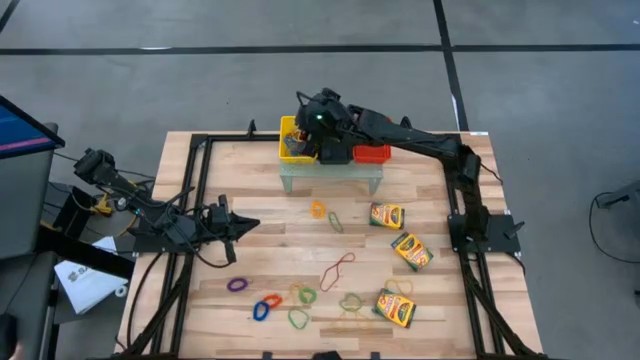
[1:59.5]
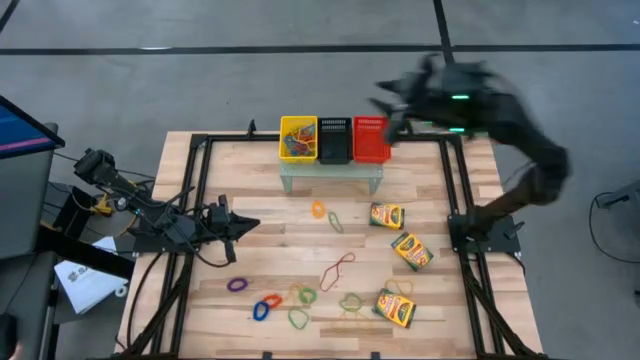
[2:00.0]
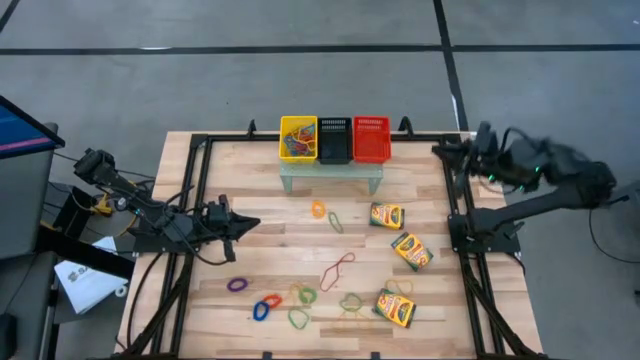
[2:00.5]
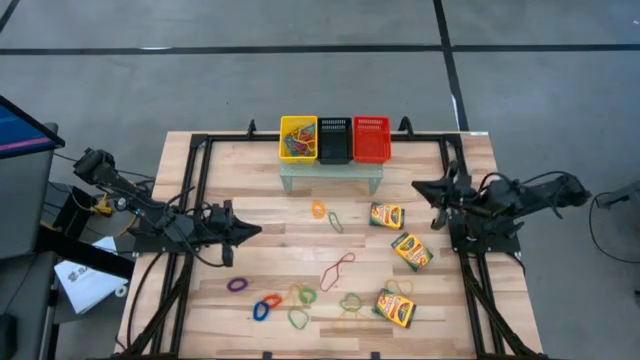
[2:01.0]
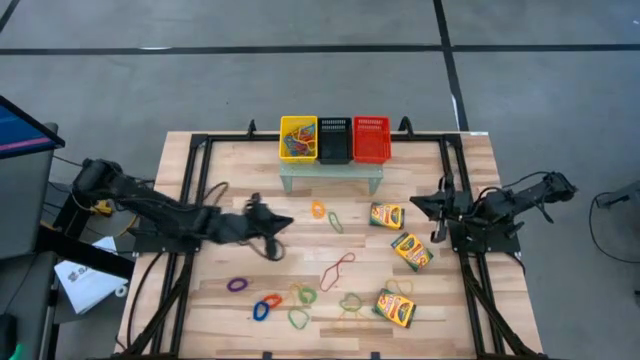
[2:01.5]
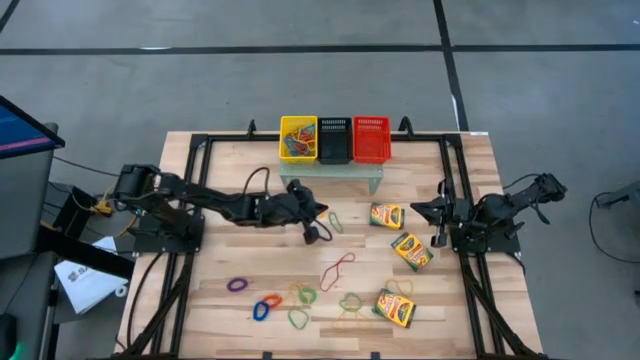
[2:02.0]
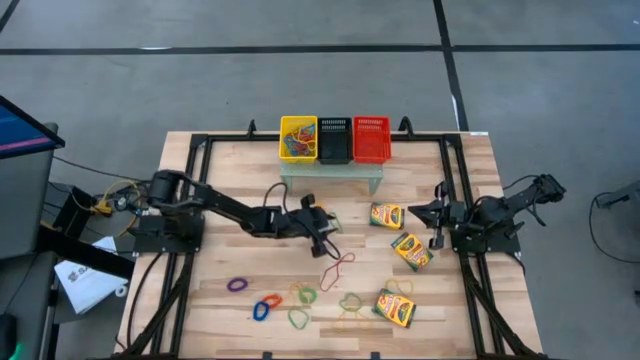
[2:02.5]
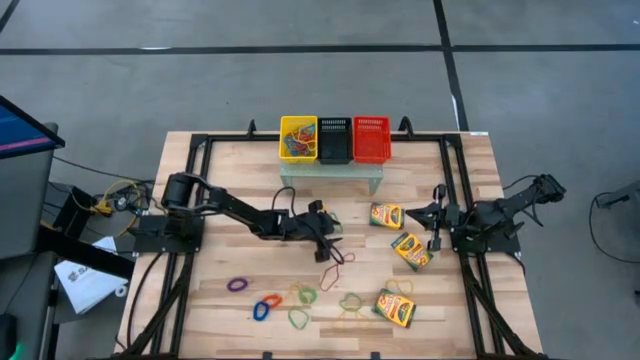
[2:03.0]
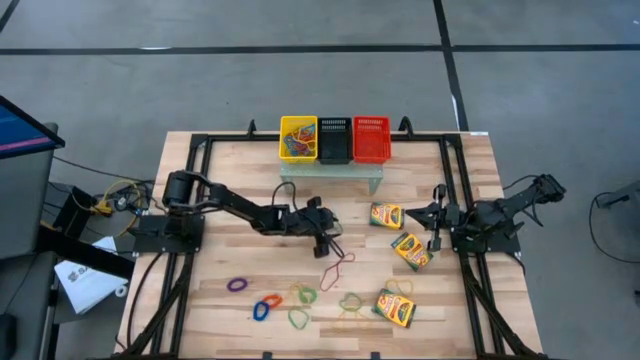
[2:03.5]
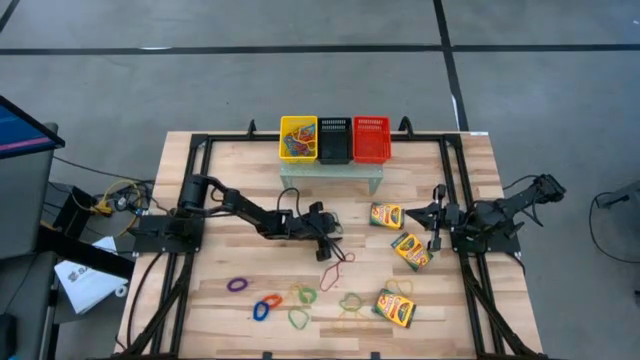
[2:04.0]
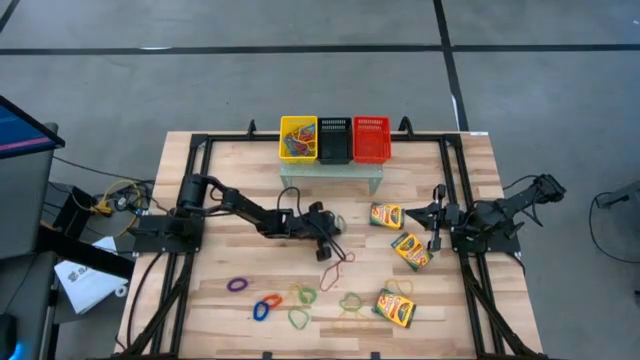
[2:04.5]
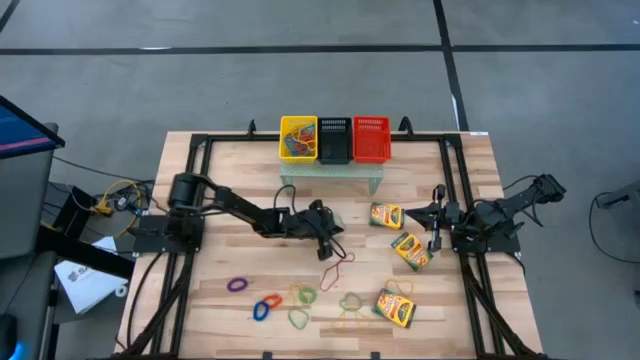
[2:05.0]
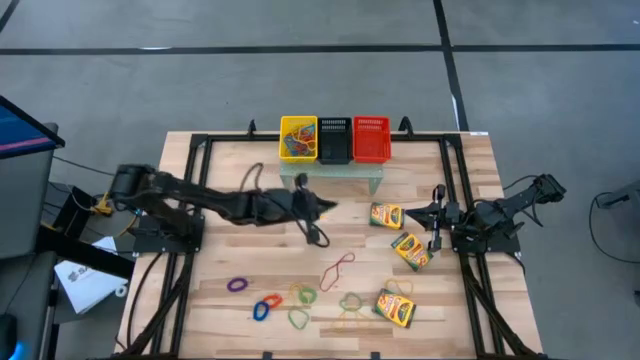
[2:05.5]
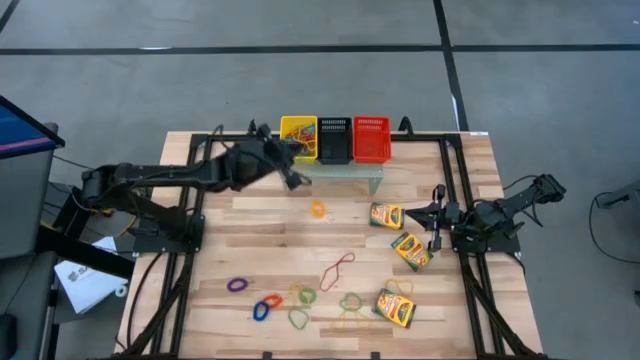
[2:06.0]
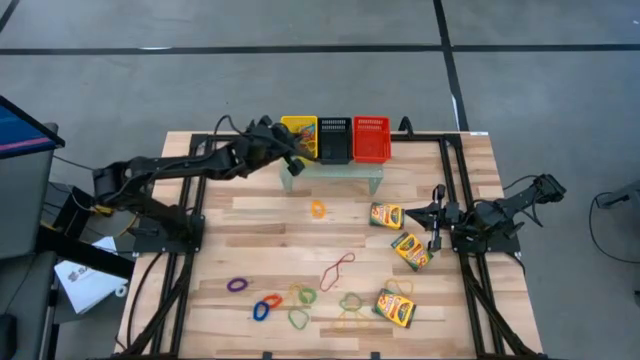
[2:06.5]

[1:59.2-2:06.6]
Task: Pick & Place Office Desk Supplies
Put the top small green rubber band into the yellow bin on the shelf

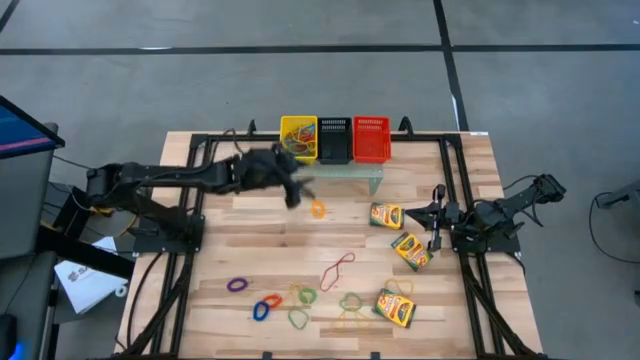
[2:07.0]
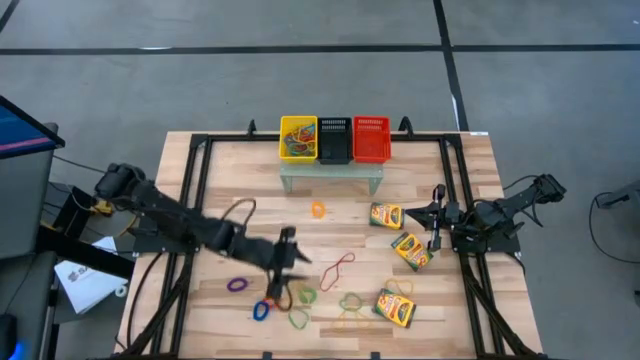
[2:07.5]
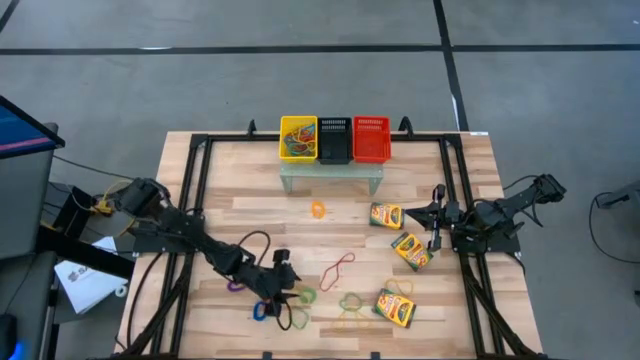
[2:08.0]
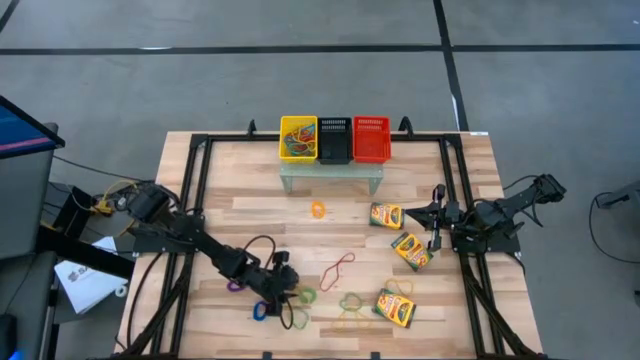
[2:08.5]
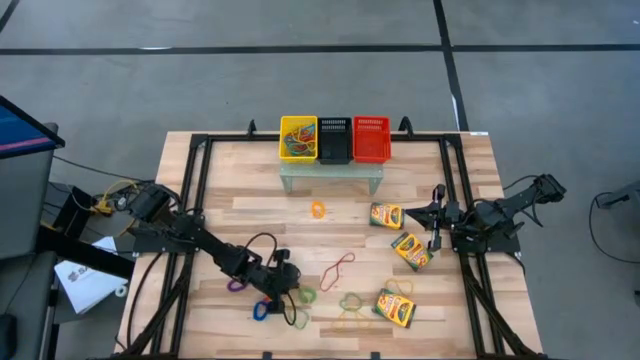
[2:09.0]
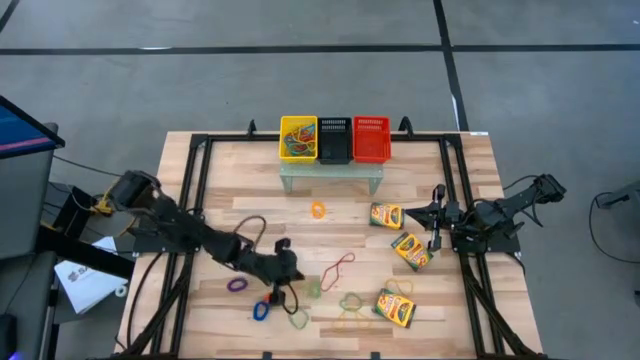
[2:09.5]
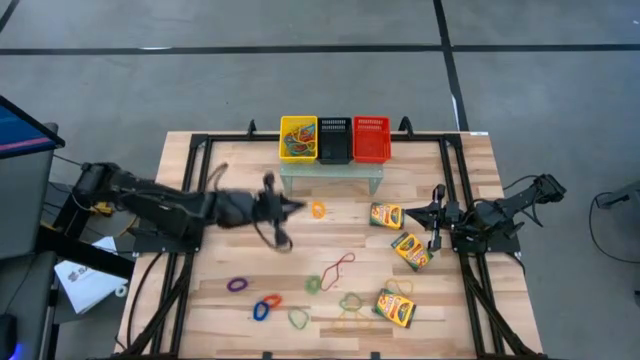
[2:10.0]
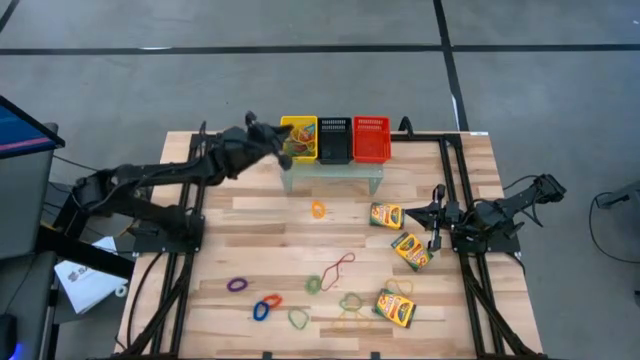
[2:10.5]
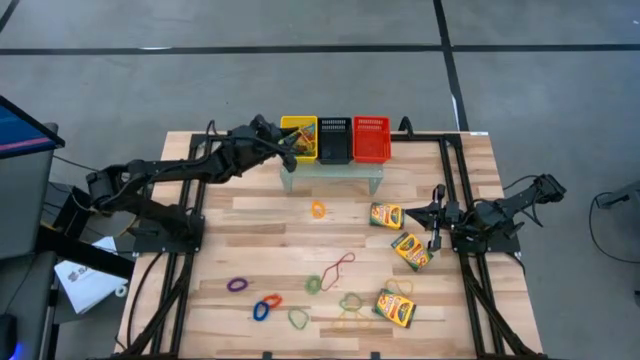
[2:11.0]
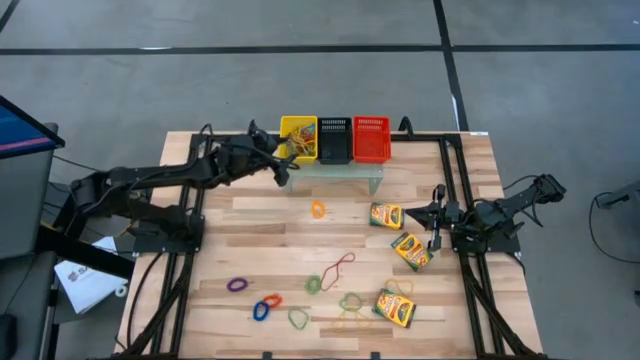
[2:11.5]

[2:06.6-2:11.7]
Put the top left big yellow rubber band into the yellow bin on the shelf

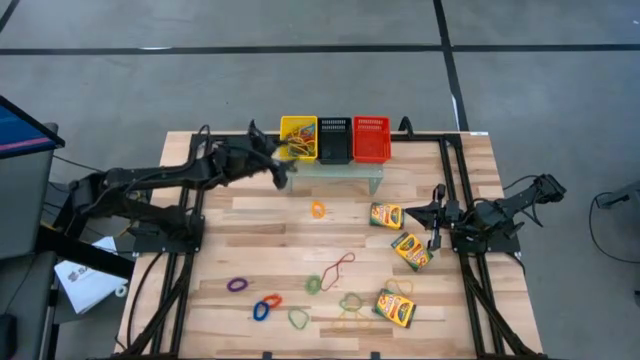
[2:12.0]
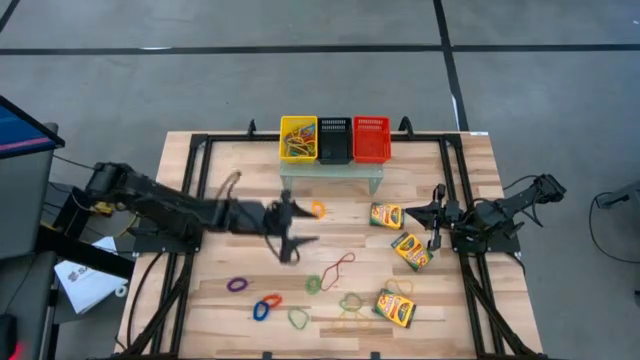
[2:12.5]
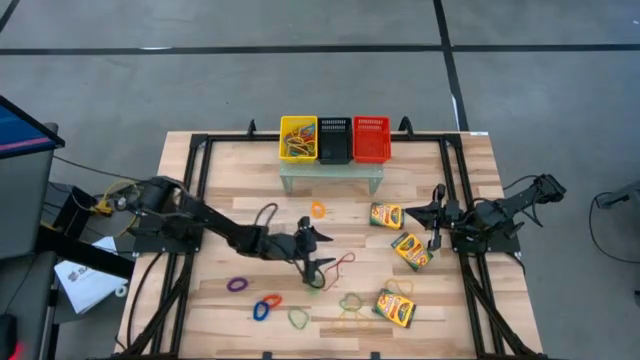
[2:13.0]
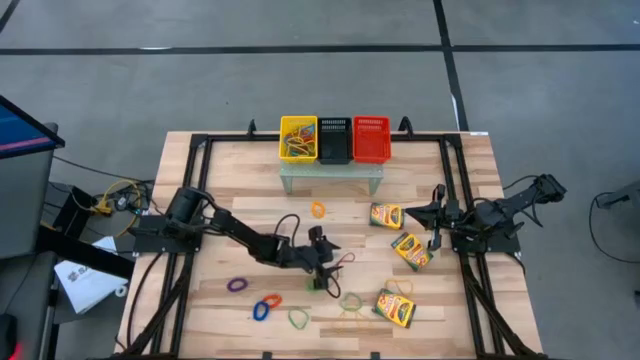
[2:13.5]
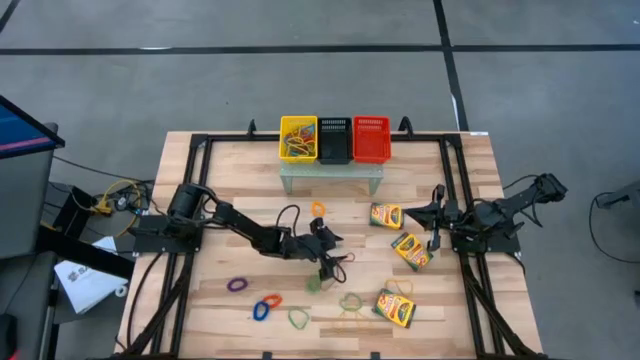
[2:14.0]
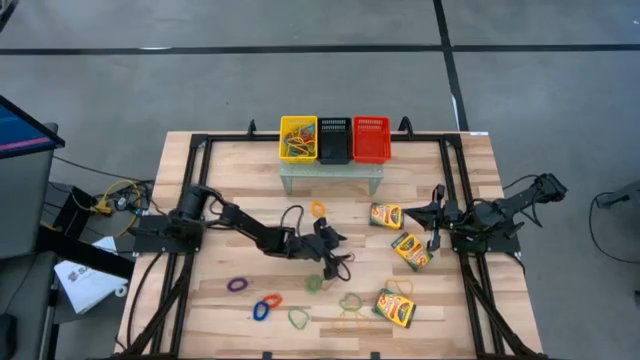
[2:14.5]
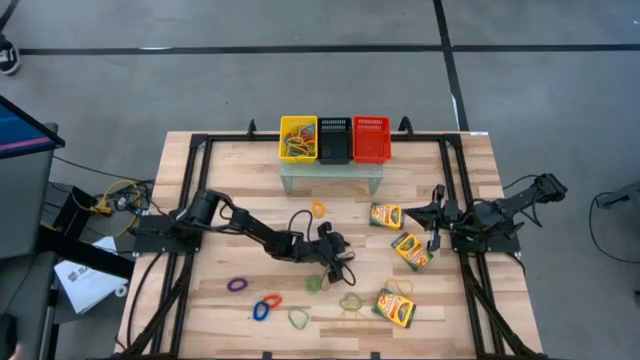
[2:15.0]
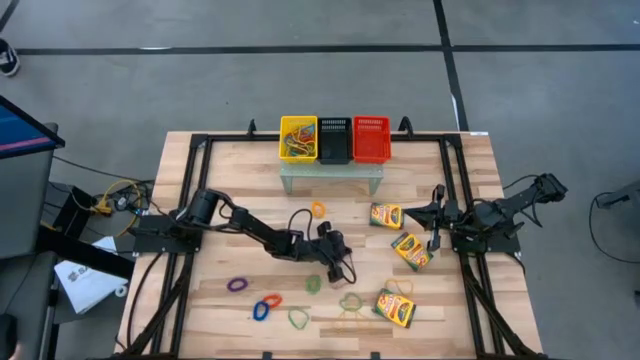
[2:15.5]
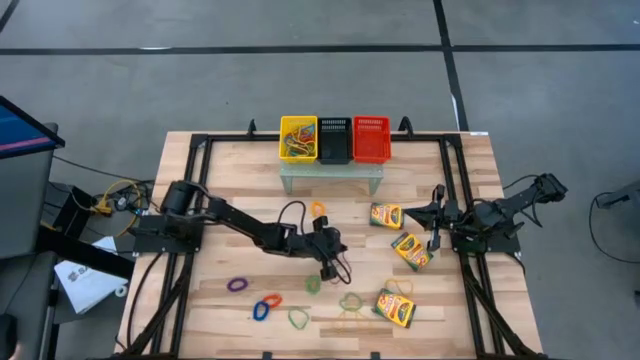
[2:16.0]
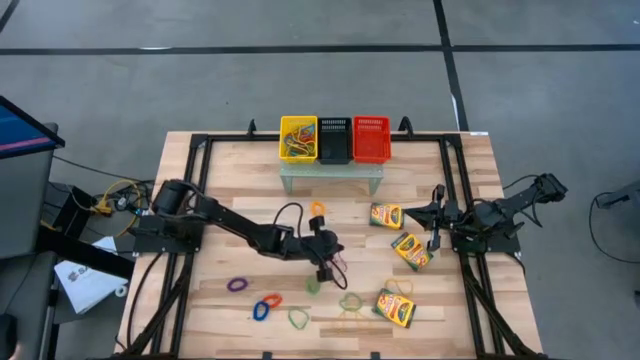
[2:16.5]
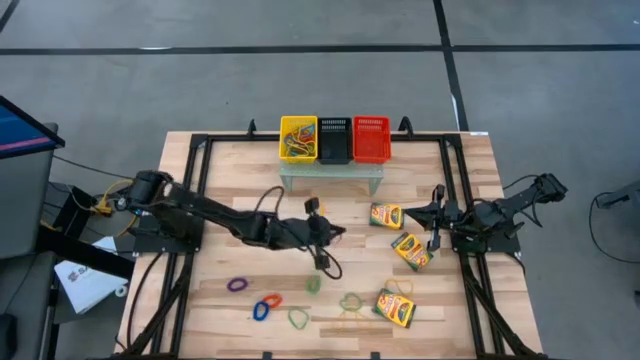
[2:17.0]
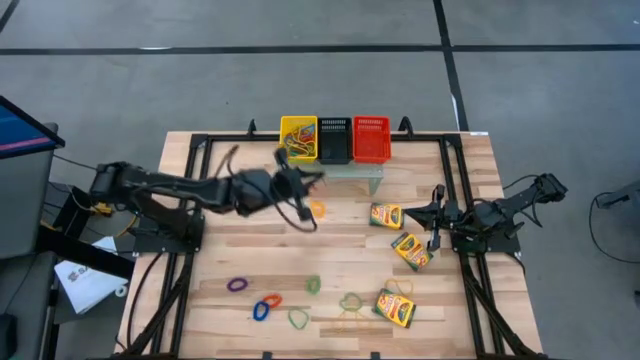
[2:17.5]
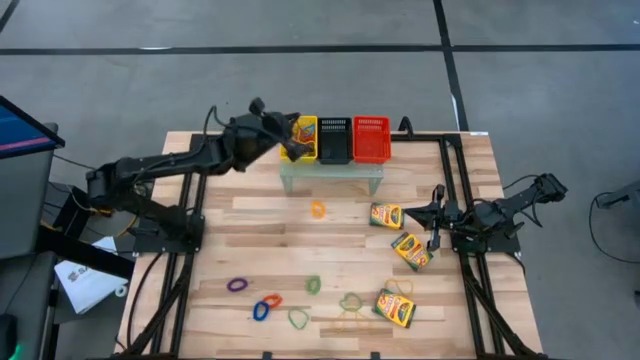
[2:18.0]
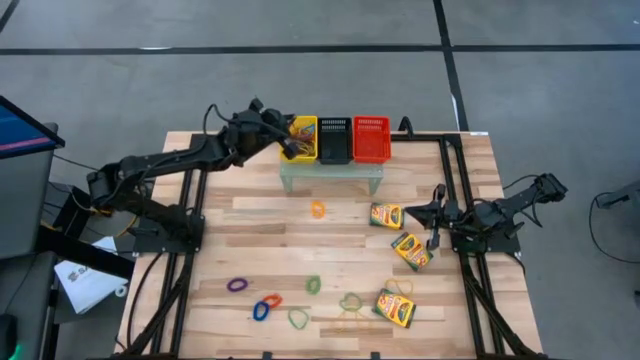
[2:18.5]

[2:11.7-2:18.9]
Put the big red rubber band into the yellow bin on the shelf

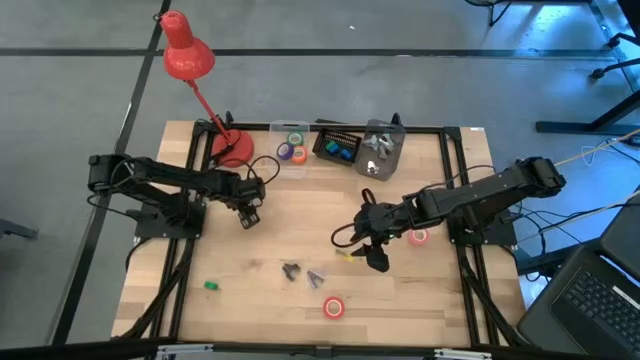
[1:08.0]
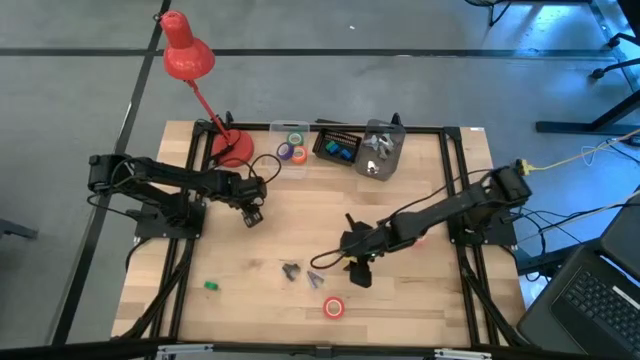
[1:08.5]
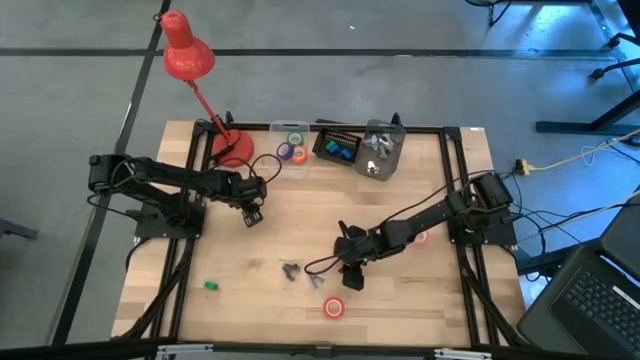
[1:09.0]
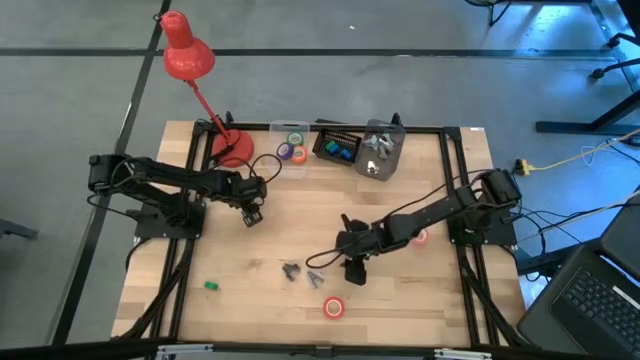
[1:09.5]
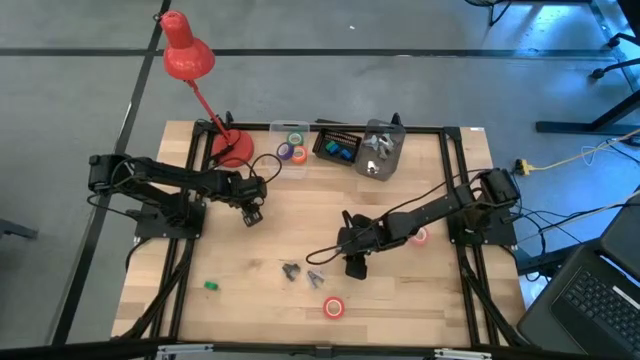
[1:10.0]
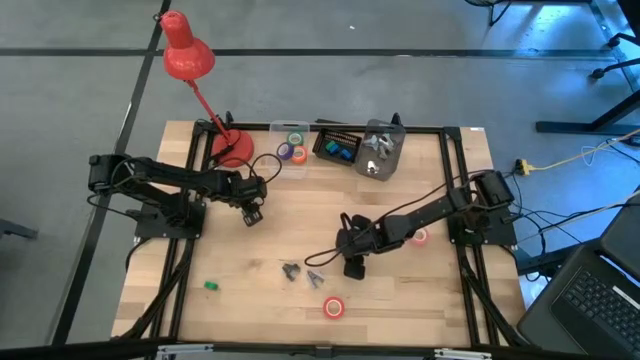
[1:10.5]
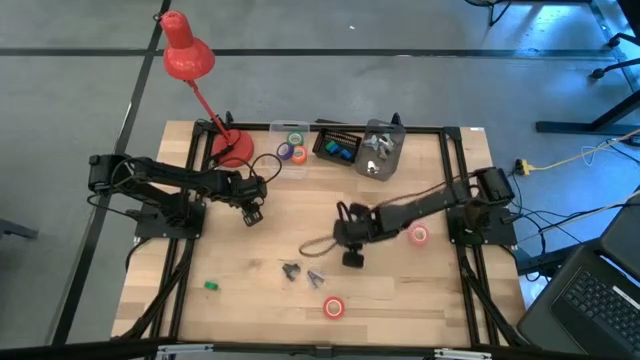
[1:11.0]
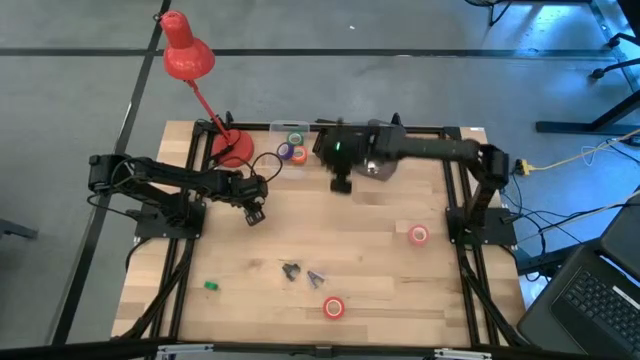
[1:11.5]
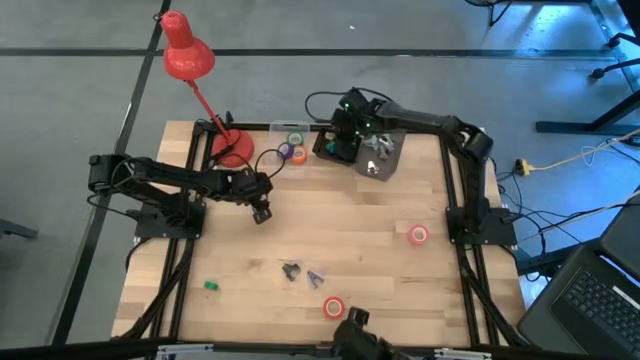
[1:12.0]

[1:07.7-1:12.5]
Task: Pick and place Stapler, Stapler remover, tape
Put the yellow stapler into the left black bin
